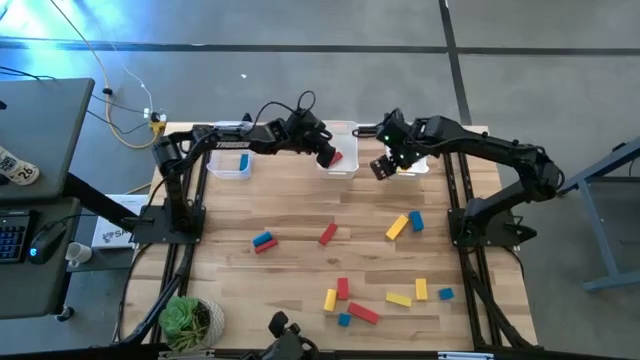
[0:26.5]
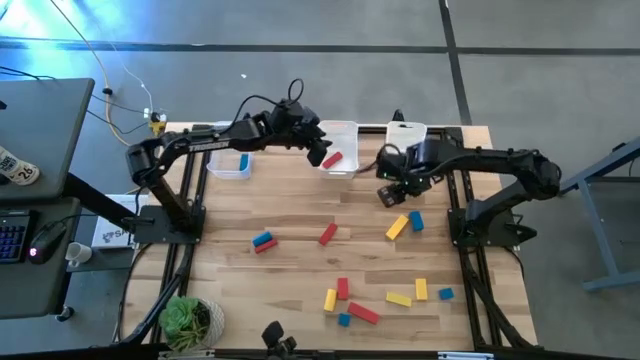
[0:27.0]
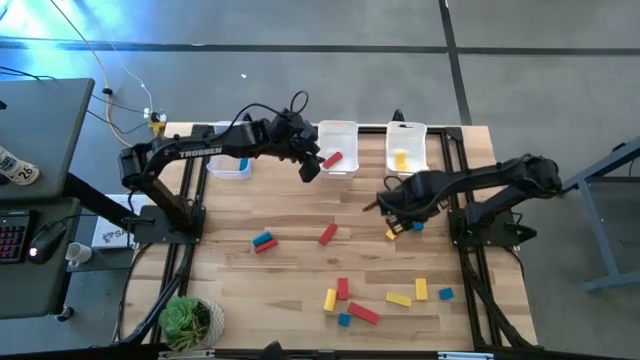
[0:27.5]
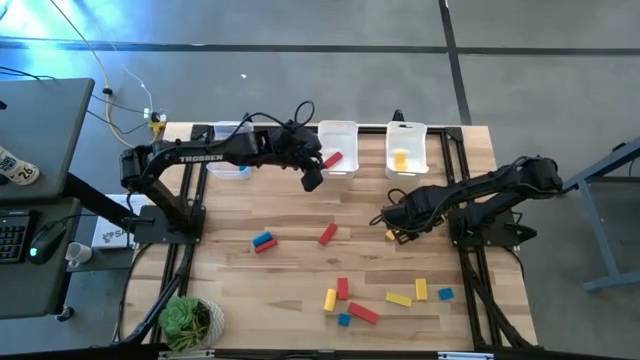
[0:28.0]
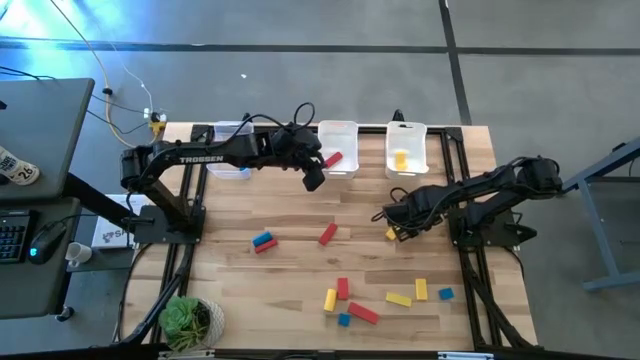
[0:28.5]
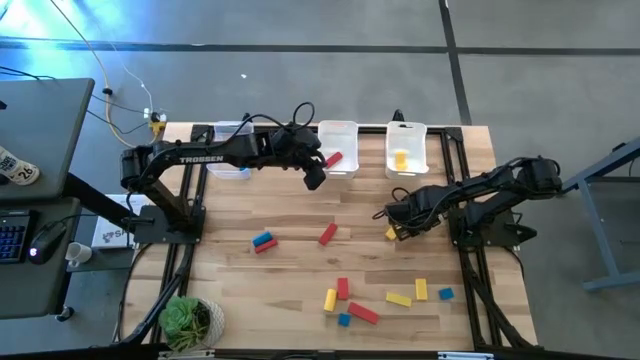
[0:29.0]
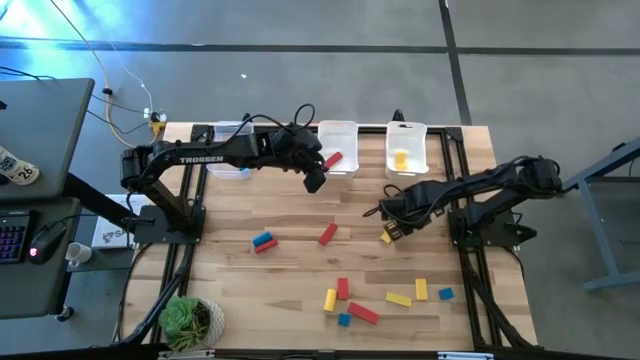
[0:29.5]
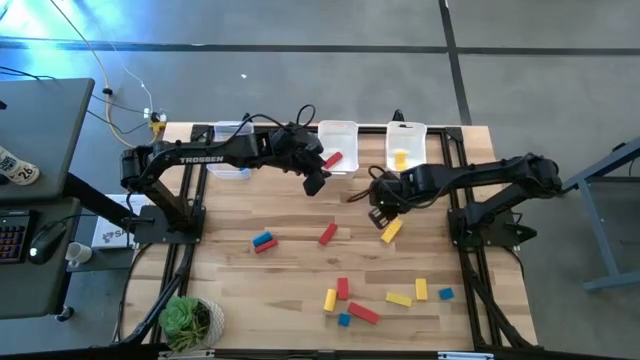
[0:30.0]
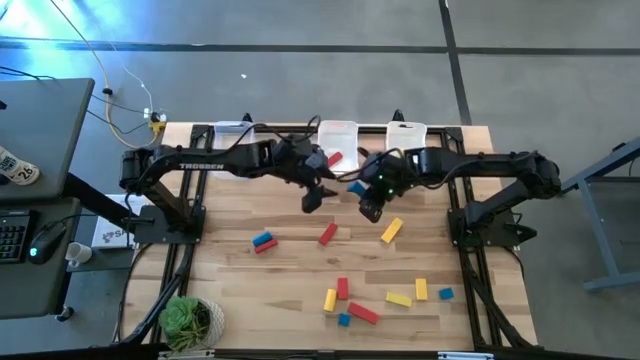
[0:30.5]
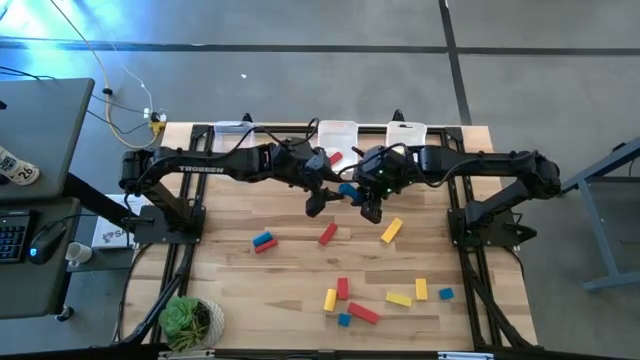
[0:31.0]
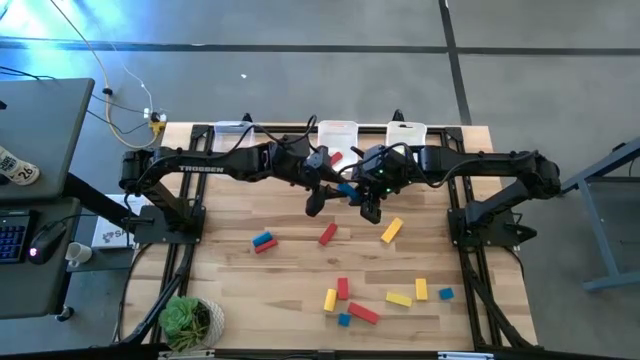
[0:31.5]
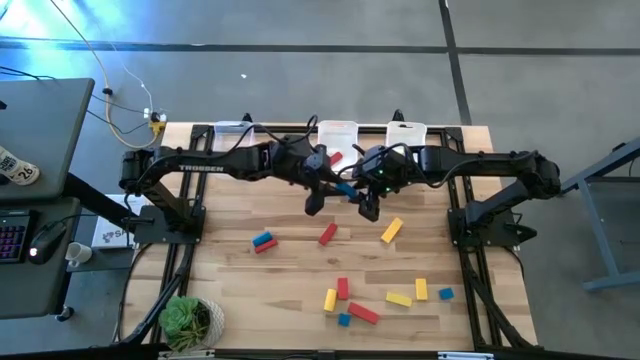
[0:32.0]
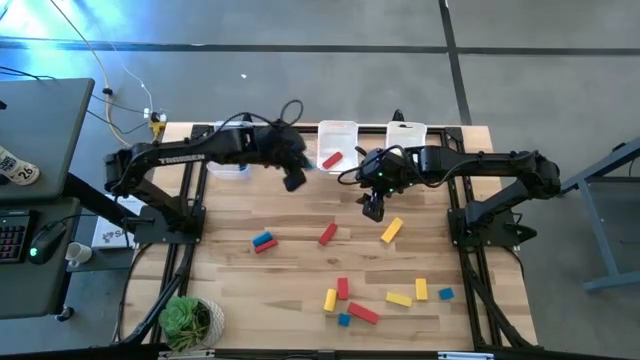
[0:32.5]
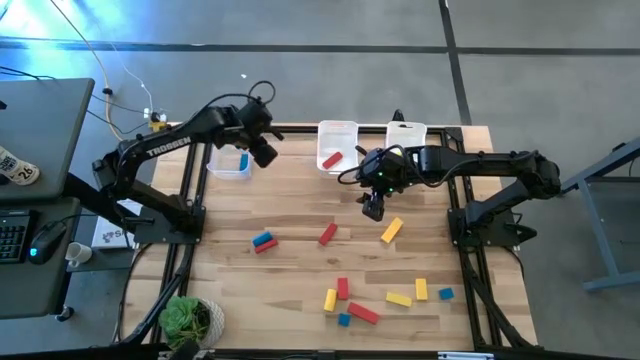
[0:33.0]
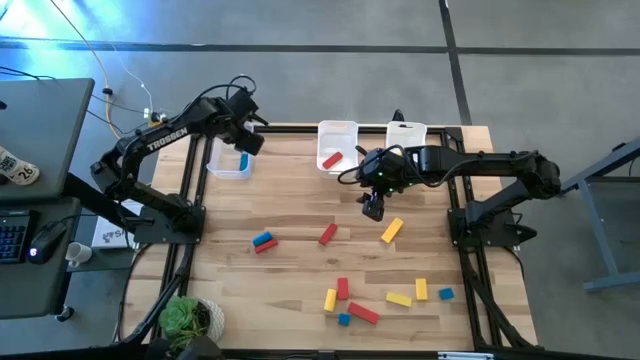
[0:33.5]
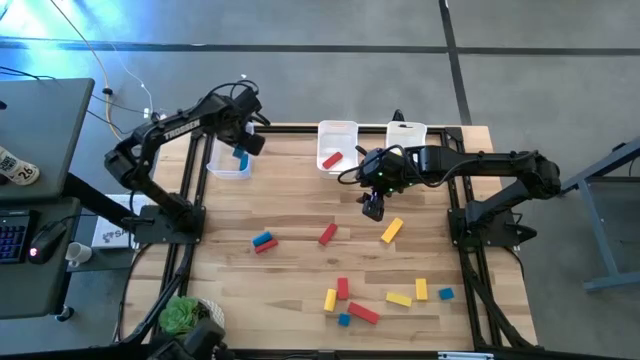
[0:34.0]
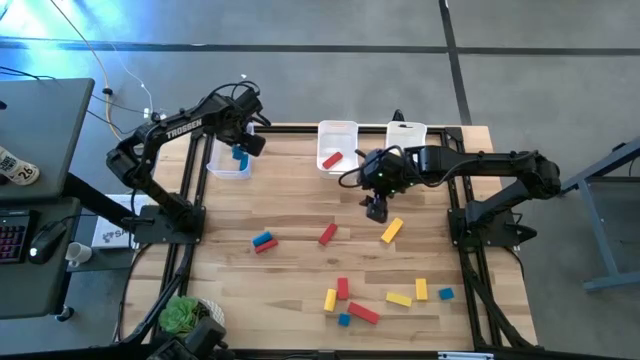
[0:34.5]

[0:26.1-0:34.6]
Task: Sort & place blocks by color
Put the blue block into the transparent bin

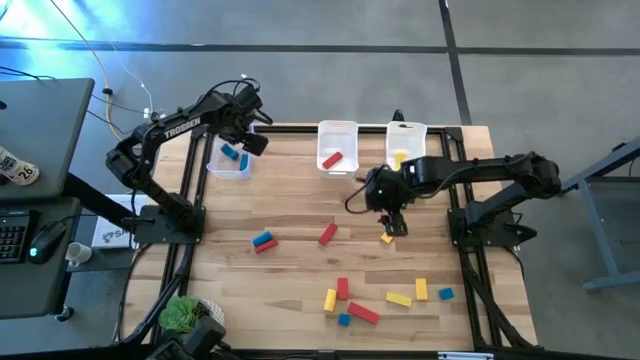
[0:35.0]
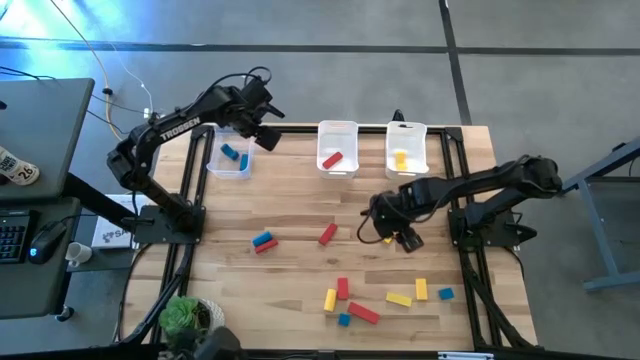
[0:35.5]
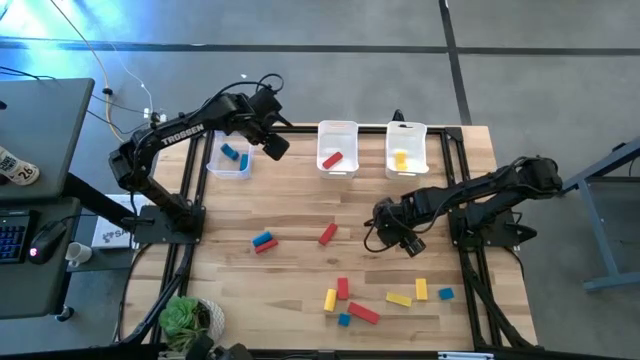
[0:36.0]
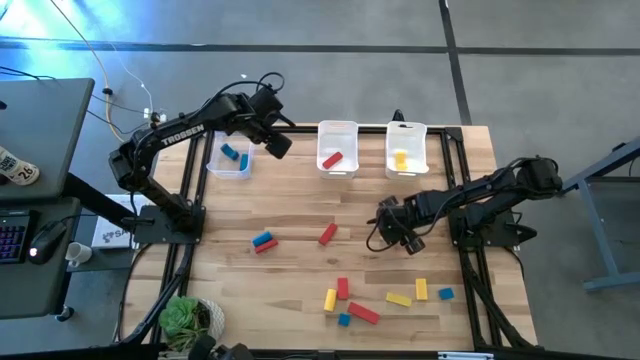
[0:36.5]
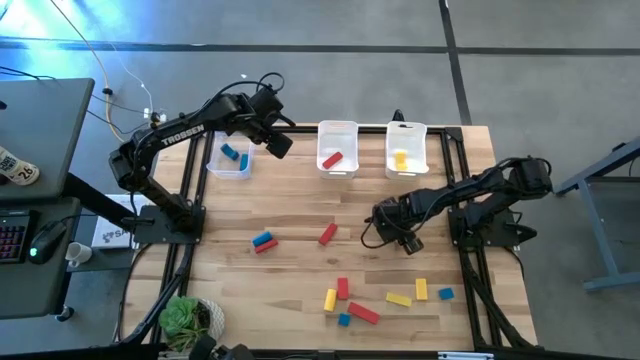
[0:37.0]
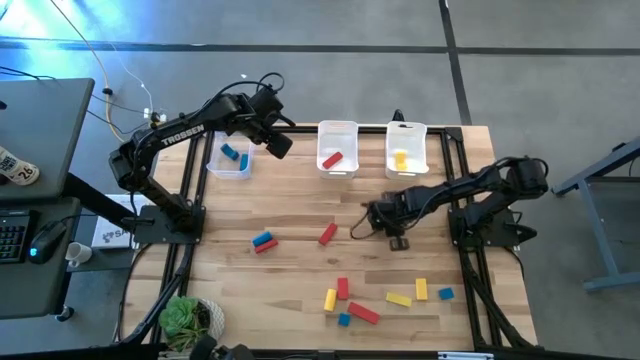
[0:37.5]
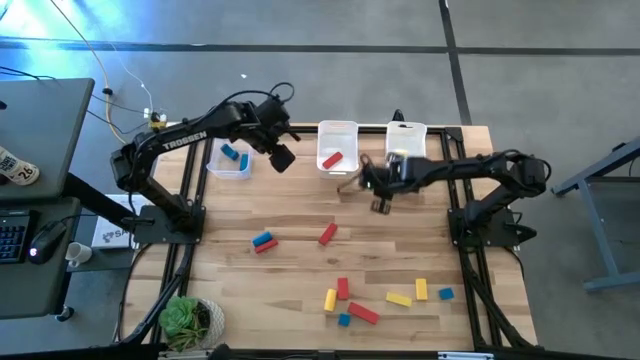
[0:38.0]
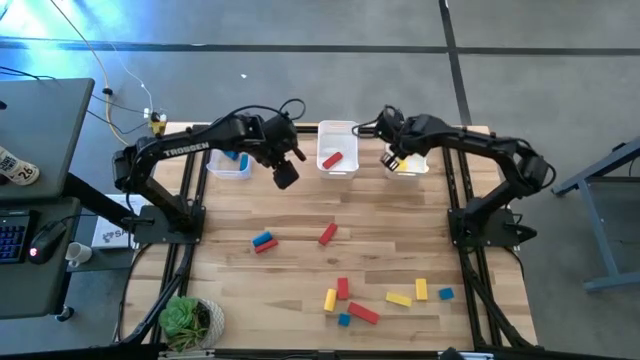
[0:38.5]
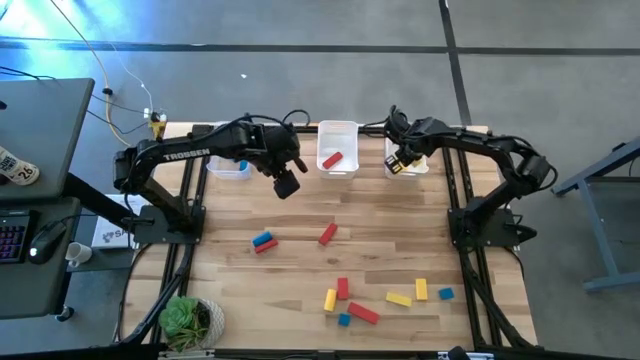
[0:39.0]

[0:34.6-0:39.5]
Put the yellow block into the right white bin

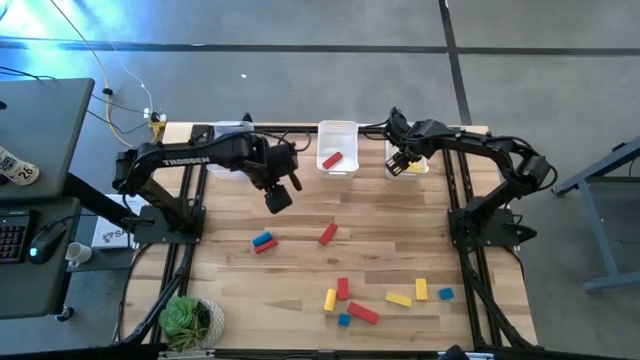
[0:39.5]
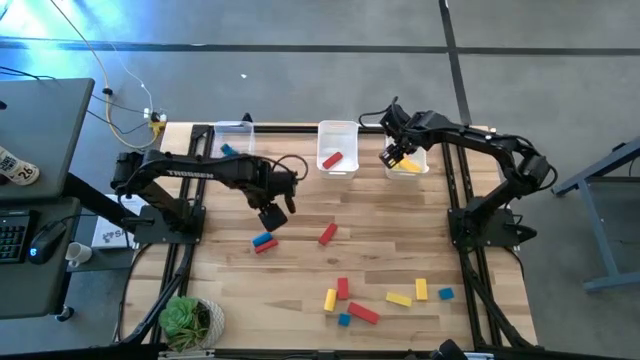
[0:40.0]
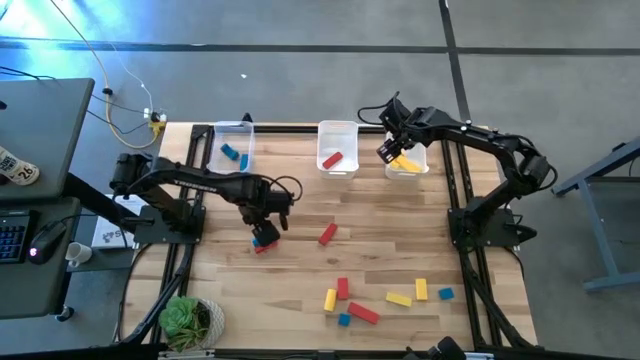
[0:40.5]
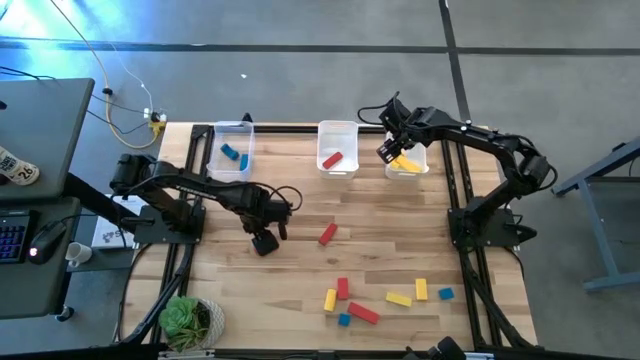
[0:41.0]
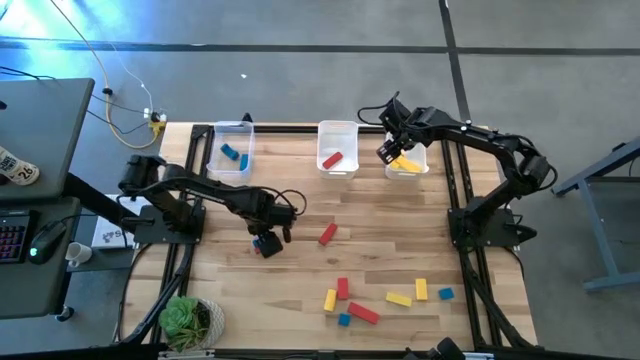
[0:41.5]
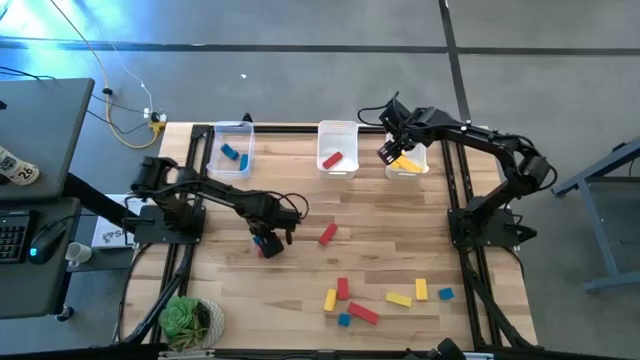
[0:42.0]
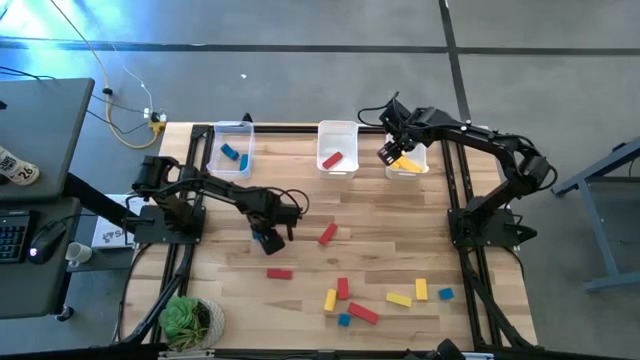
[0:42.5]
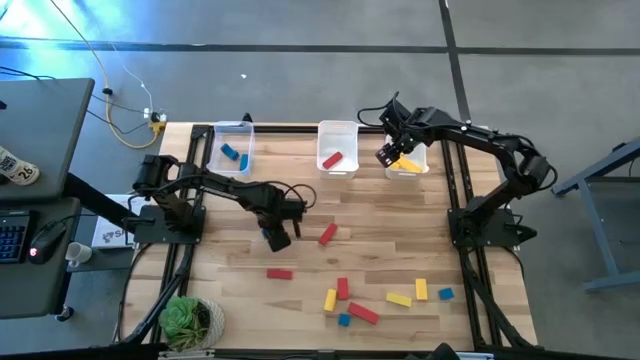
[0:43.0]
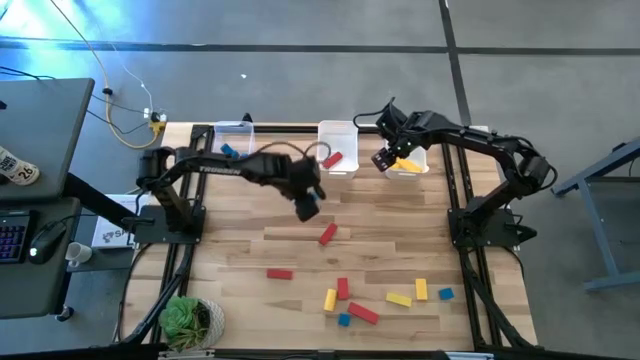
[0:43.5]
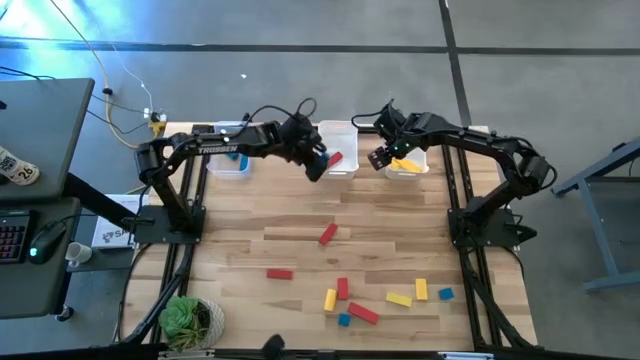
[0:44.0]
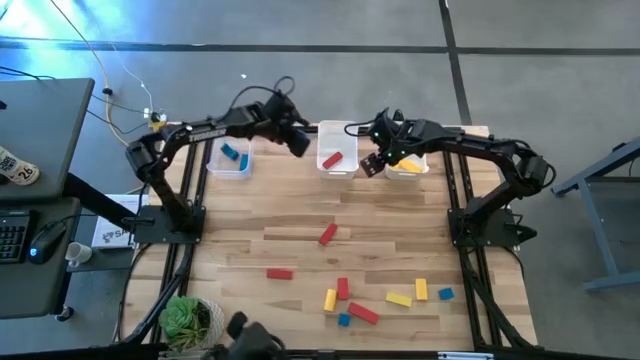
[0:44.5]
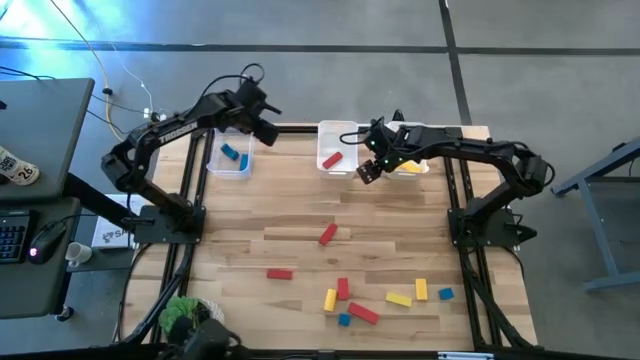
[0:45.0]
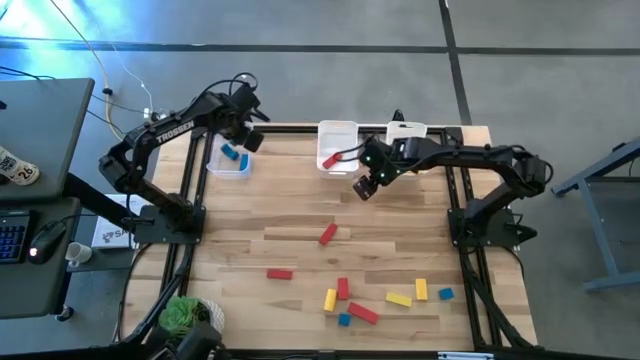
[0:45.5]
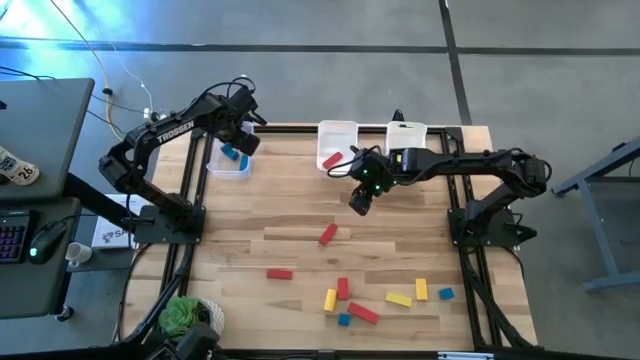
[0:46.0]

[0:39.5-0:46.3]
Put the blue block into the transparent bin

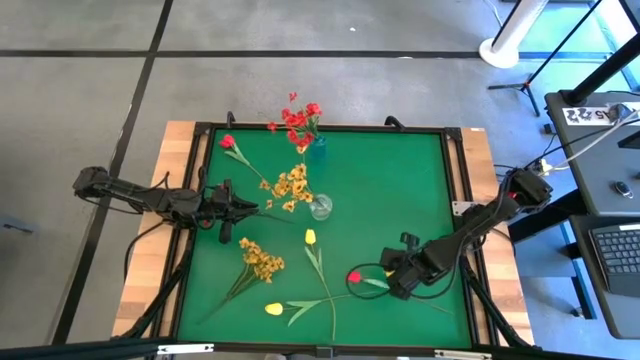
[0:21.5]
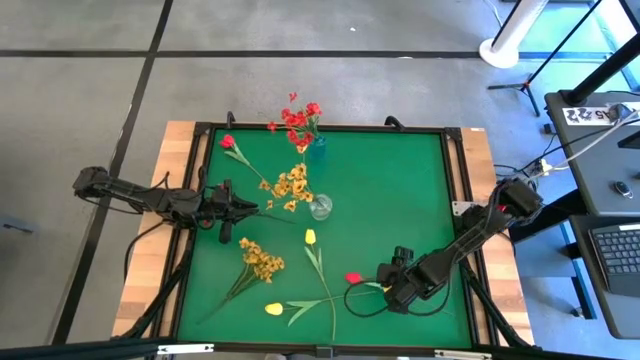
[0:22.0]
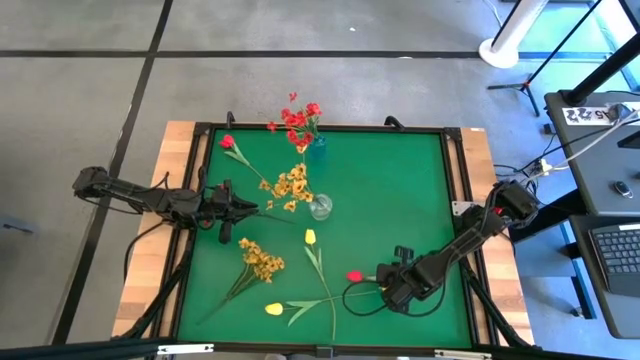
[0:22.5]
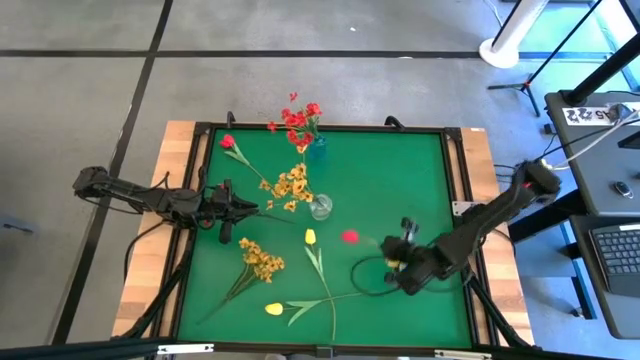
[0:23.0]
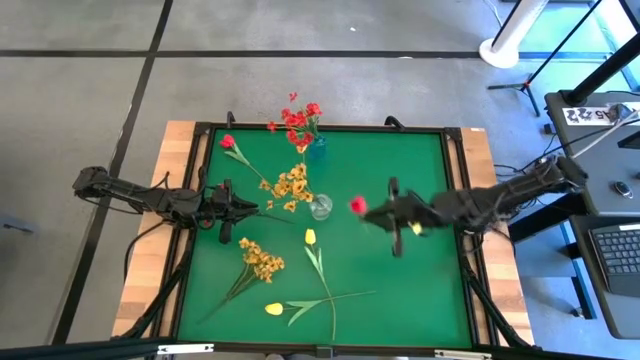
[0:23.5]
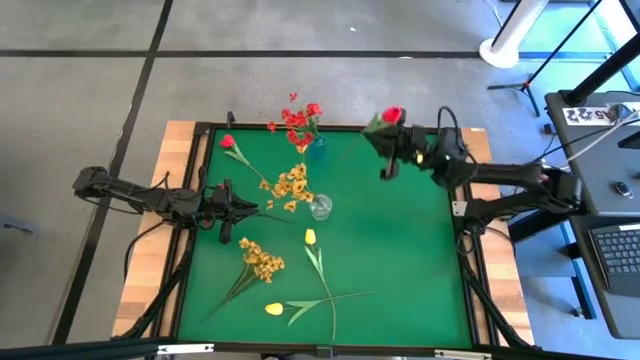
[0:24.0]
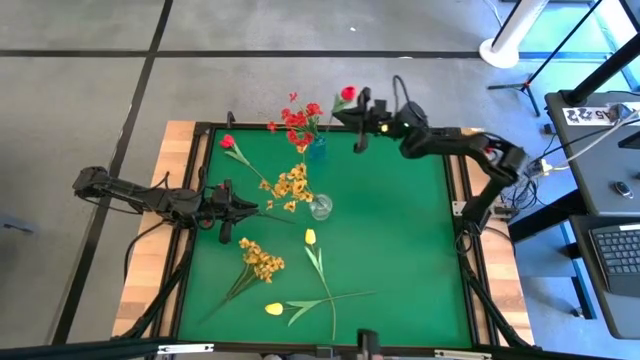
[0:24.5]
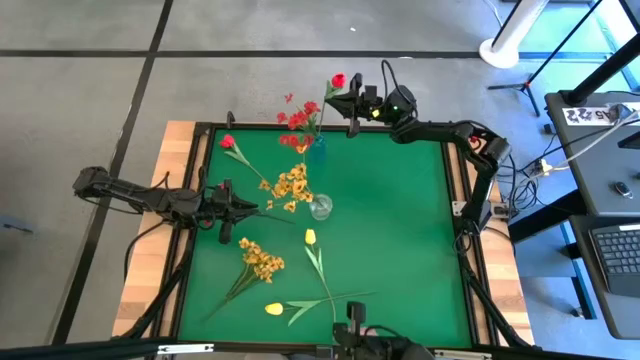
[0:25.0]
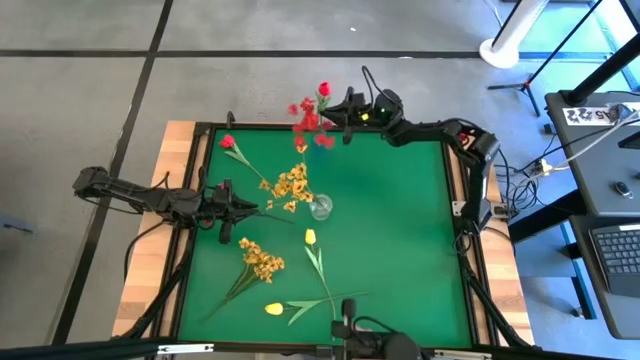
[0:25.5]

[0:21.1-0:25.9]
Task: Sort flowers into vase by color
Put the bottom red tulip into the blue vase
